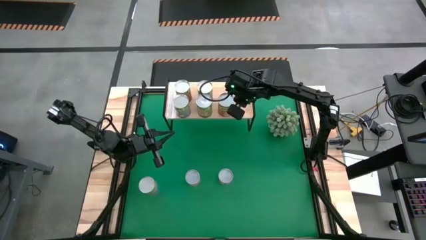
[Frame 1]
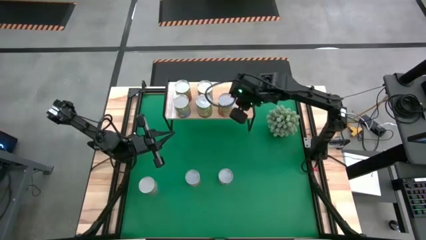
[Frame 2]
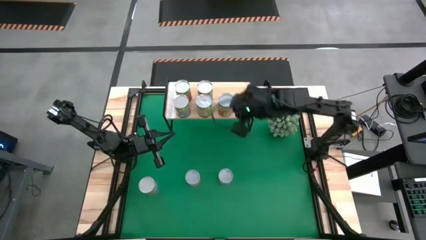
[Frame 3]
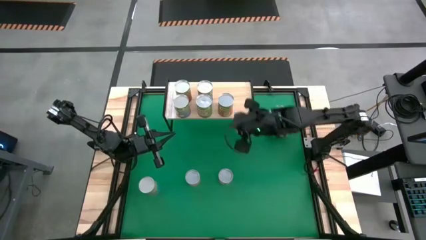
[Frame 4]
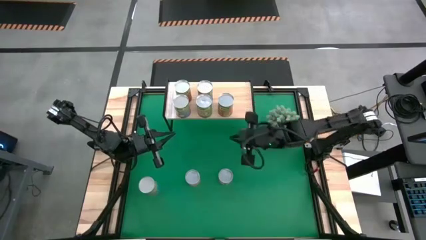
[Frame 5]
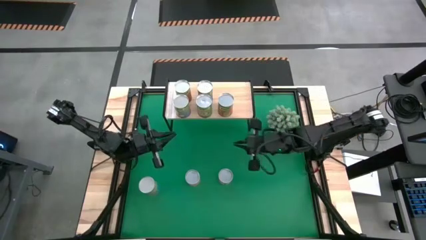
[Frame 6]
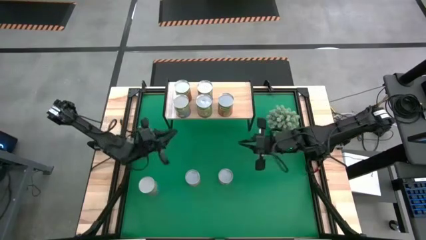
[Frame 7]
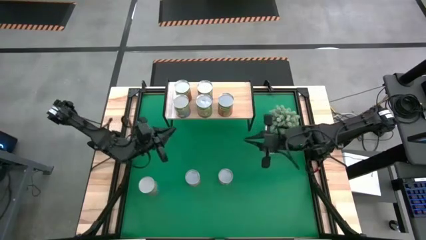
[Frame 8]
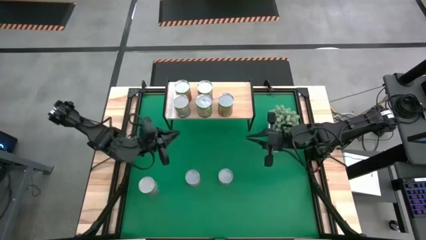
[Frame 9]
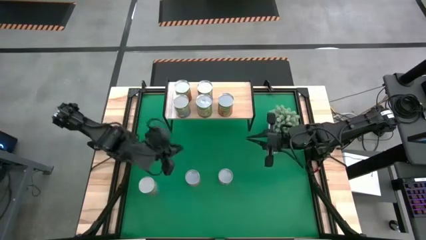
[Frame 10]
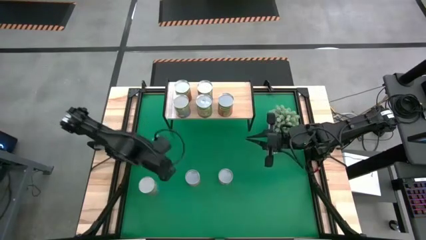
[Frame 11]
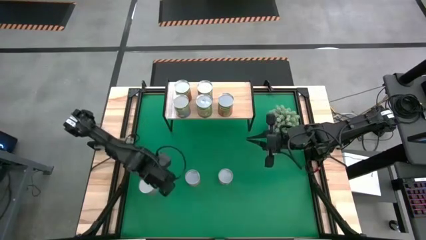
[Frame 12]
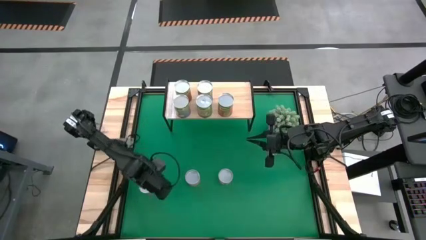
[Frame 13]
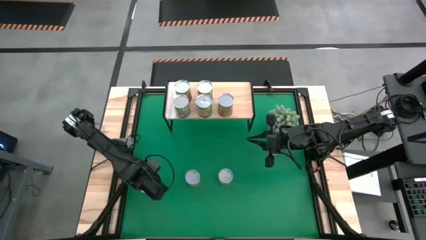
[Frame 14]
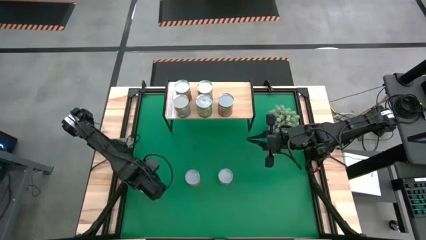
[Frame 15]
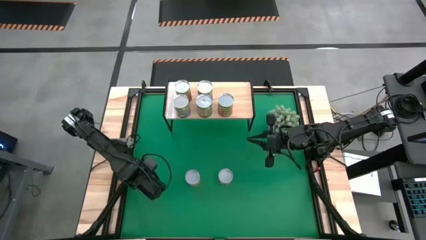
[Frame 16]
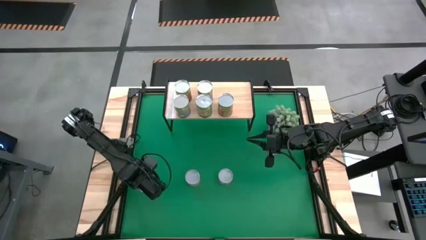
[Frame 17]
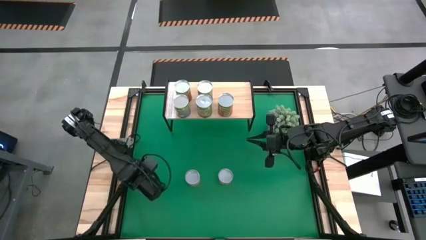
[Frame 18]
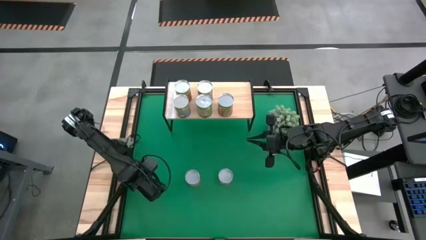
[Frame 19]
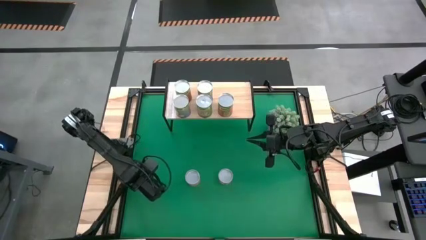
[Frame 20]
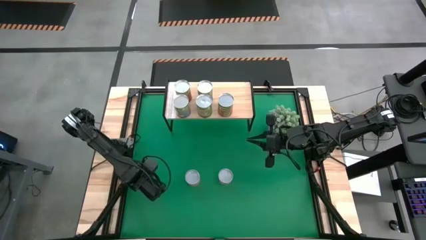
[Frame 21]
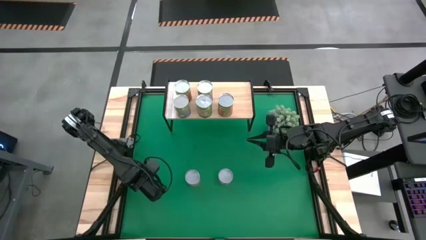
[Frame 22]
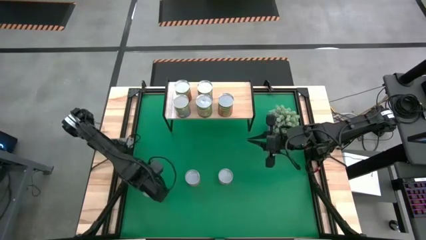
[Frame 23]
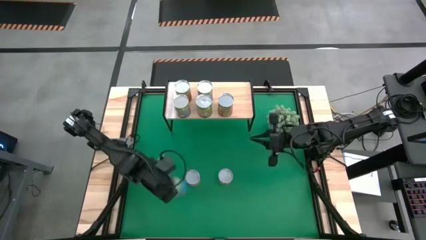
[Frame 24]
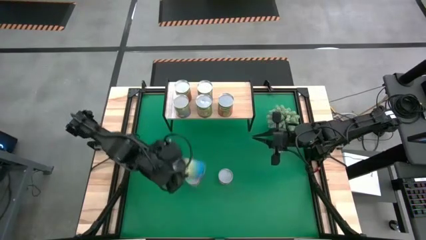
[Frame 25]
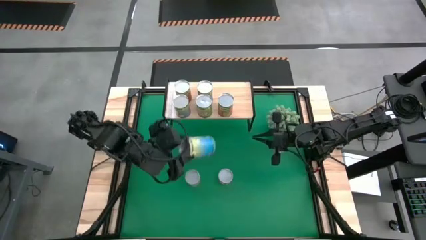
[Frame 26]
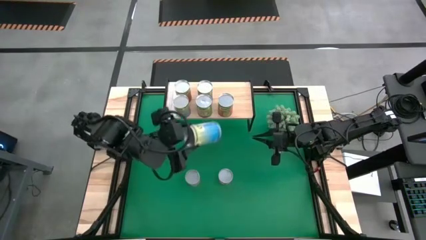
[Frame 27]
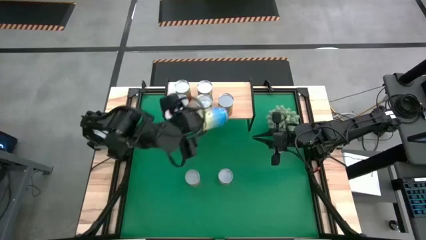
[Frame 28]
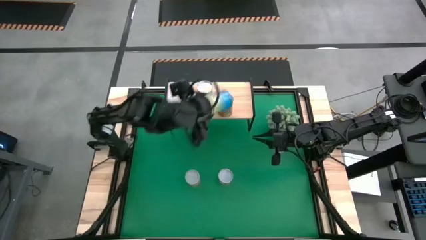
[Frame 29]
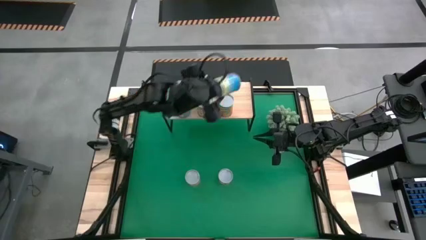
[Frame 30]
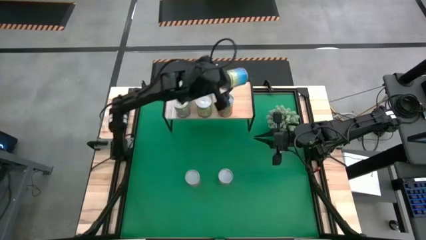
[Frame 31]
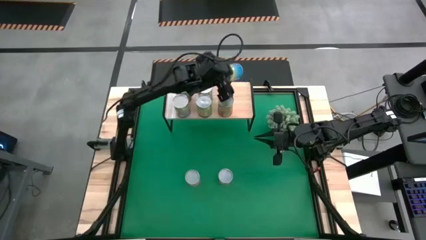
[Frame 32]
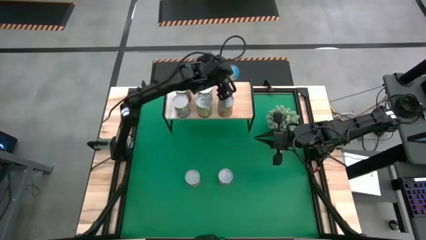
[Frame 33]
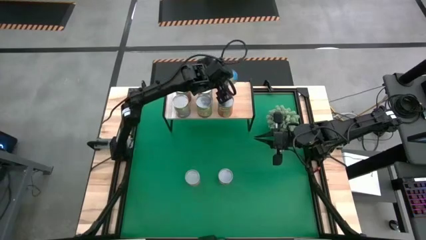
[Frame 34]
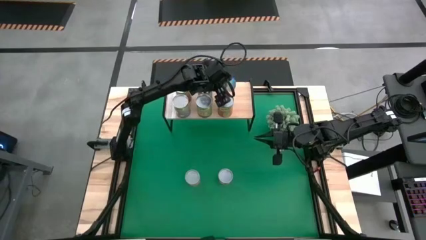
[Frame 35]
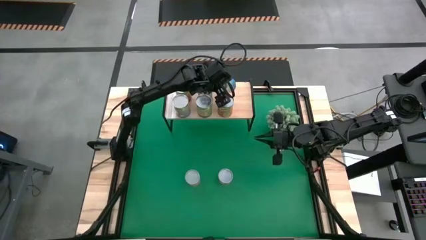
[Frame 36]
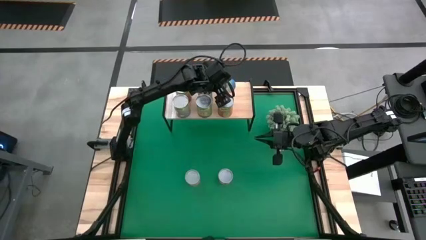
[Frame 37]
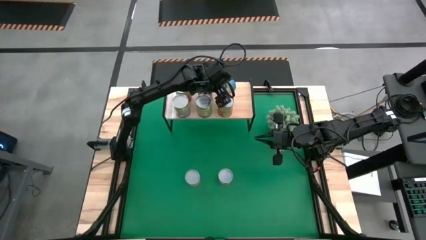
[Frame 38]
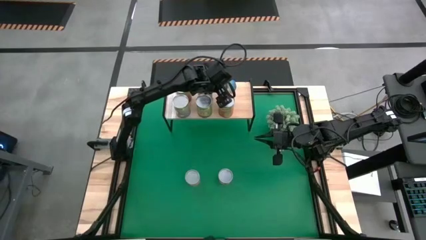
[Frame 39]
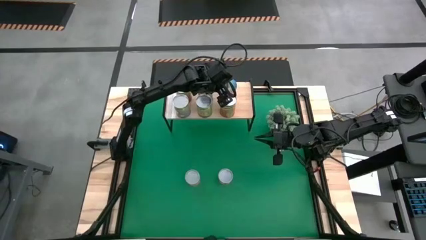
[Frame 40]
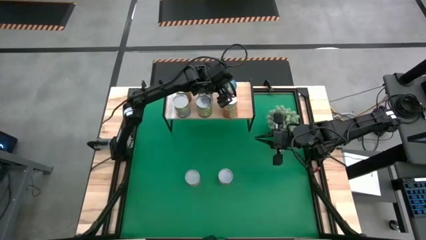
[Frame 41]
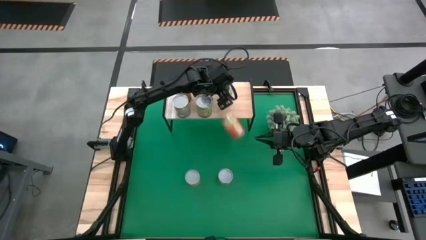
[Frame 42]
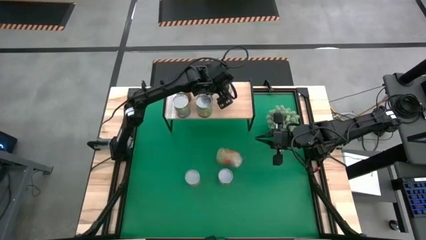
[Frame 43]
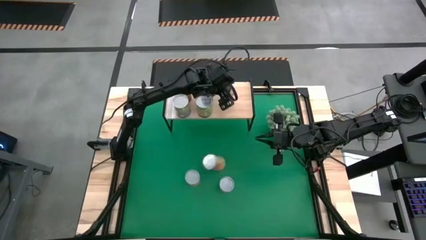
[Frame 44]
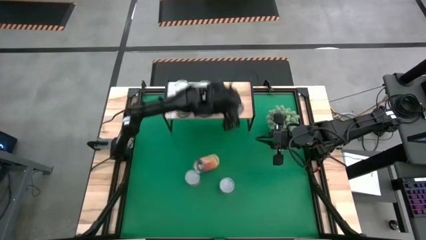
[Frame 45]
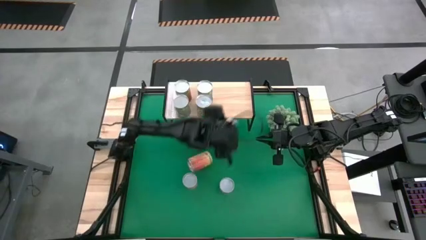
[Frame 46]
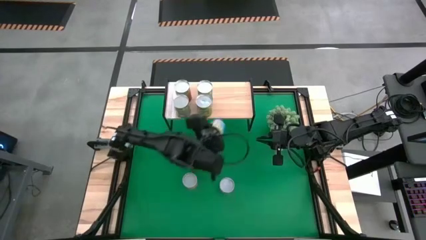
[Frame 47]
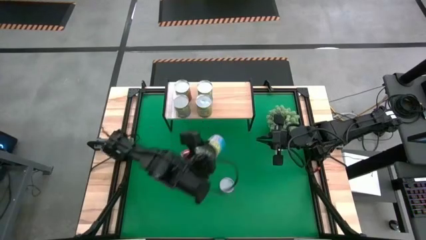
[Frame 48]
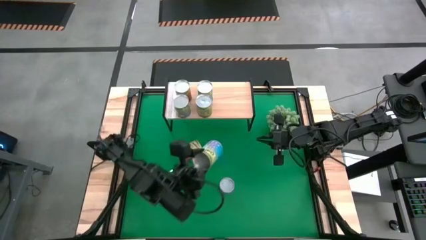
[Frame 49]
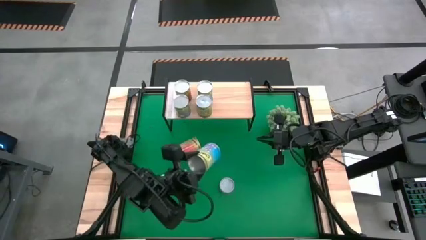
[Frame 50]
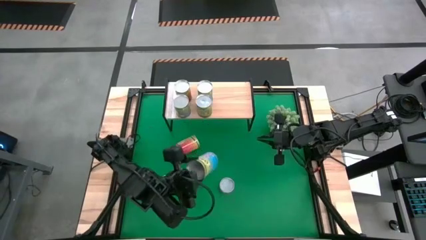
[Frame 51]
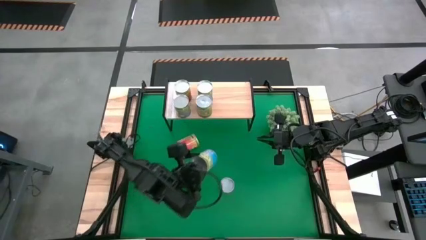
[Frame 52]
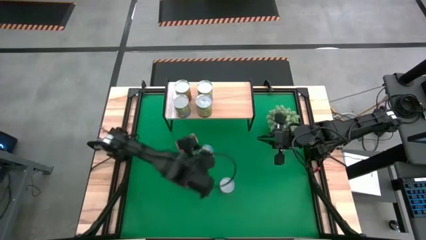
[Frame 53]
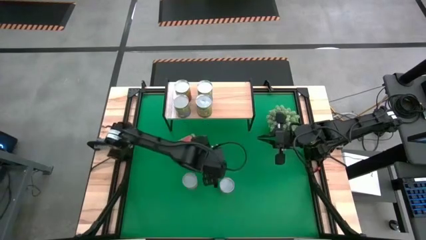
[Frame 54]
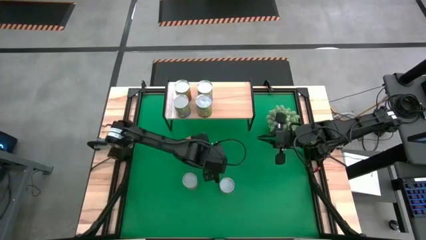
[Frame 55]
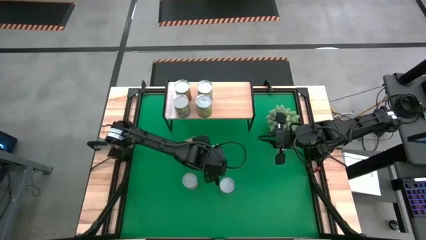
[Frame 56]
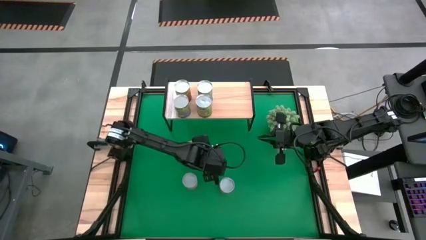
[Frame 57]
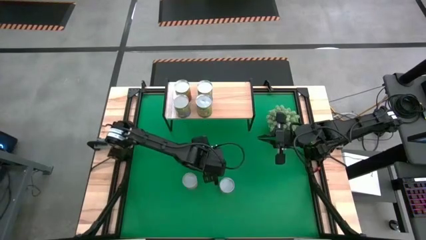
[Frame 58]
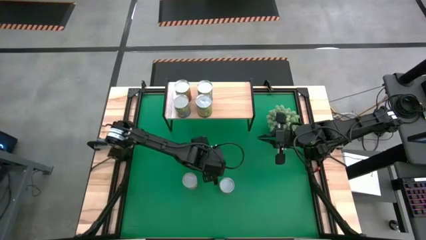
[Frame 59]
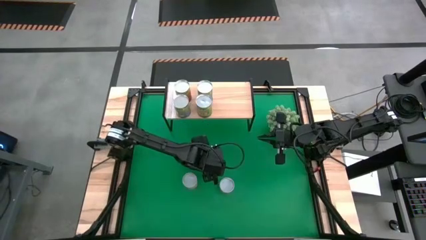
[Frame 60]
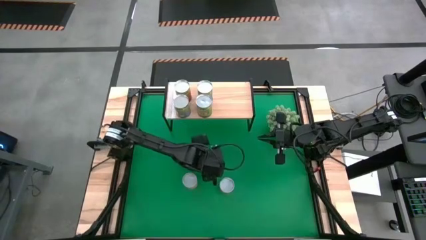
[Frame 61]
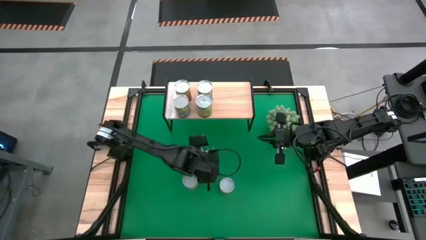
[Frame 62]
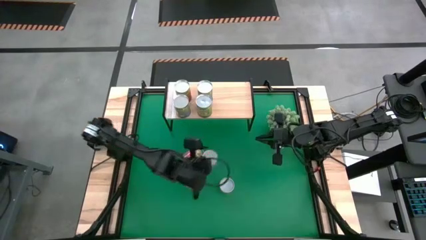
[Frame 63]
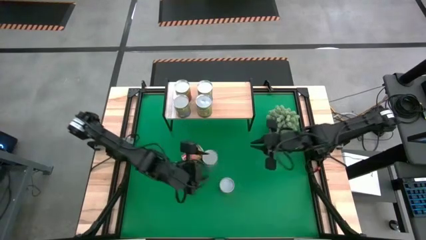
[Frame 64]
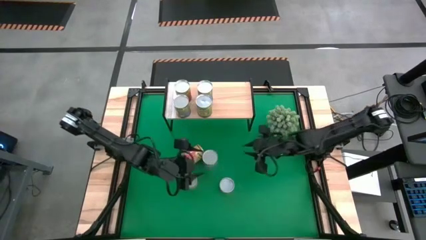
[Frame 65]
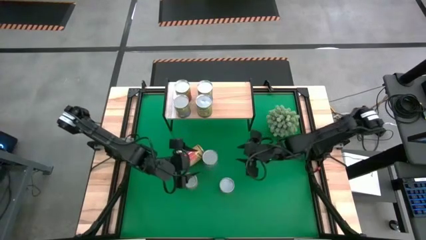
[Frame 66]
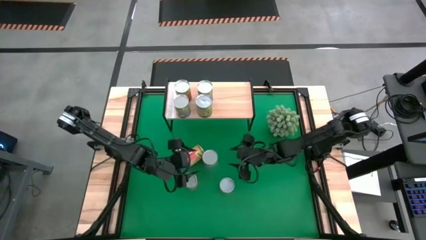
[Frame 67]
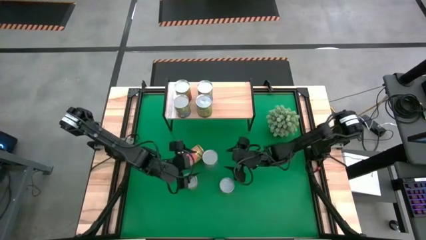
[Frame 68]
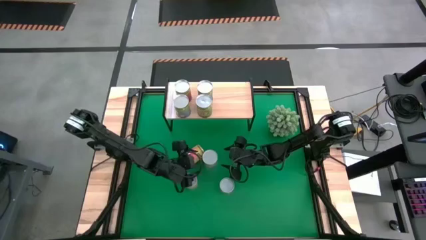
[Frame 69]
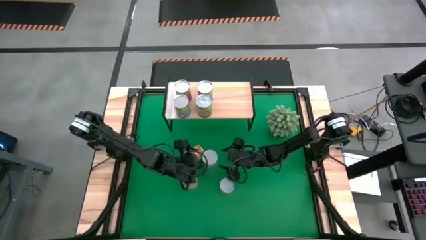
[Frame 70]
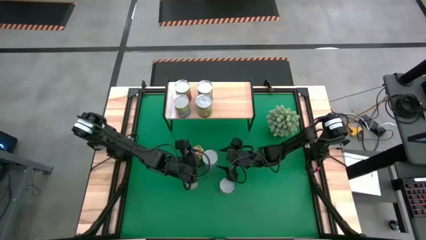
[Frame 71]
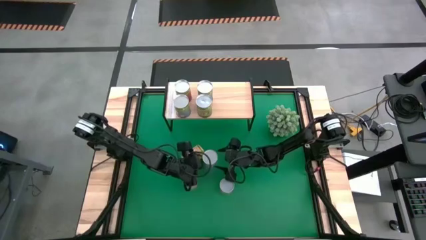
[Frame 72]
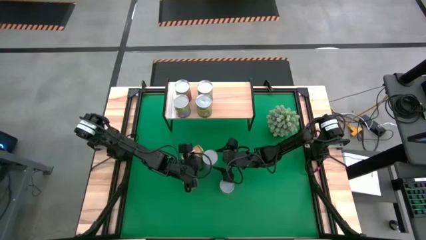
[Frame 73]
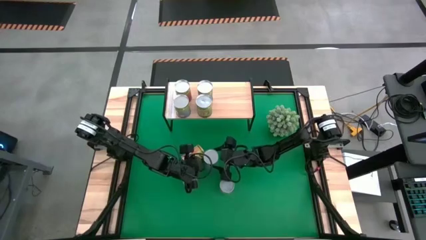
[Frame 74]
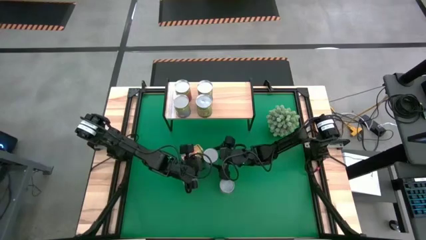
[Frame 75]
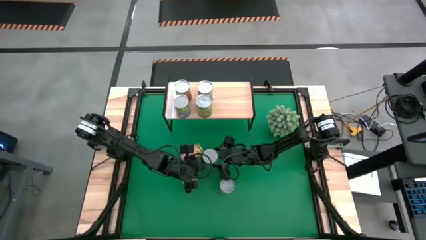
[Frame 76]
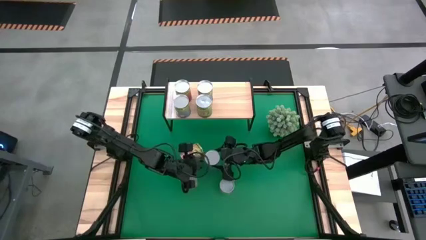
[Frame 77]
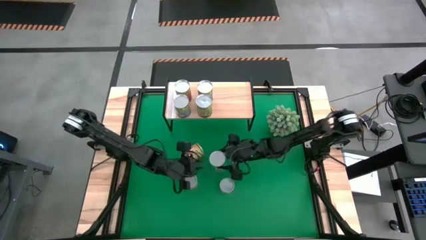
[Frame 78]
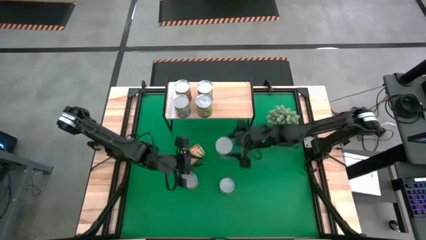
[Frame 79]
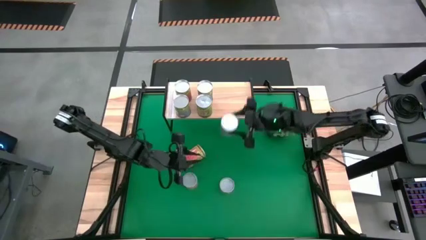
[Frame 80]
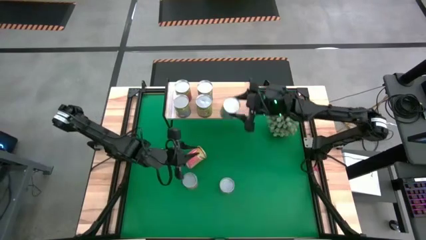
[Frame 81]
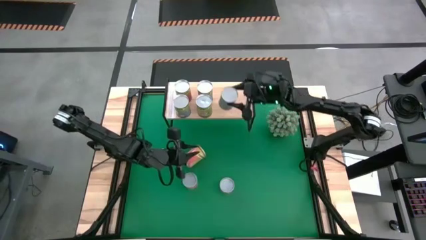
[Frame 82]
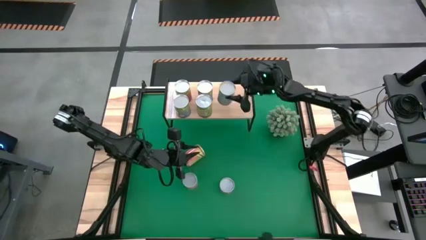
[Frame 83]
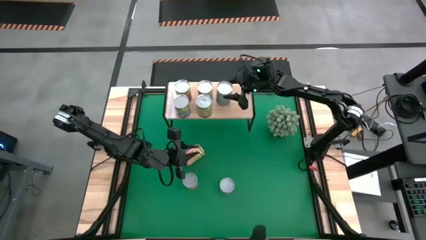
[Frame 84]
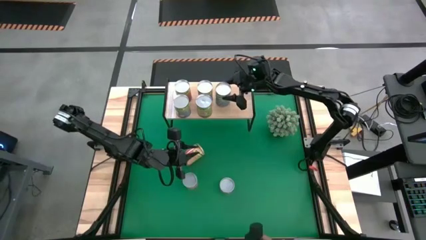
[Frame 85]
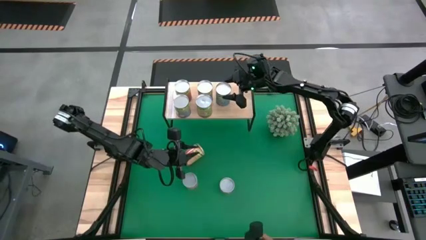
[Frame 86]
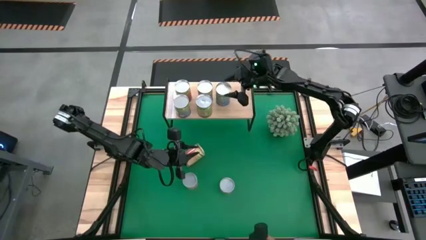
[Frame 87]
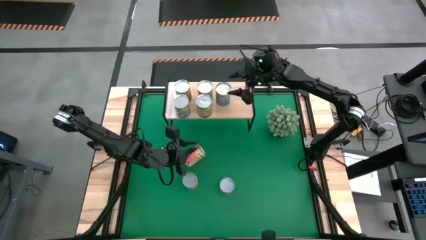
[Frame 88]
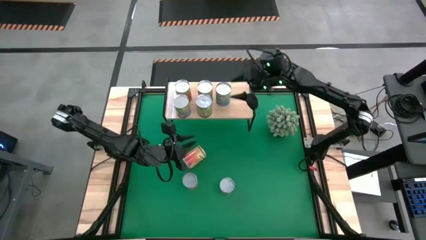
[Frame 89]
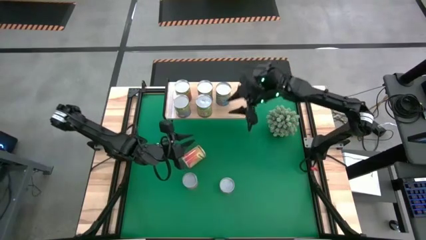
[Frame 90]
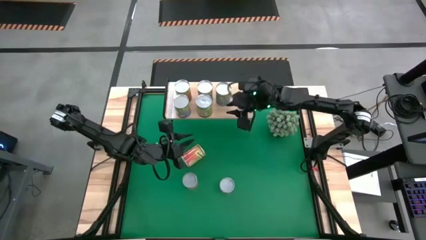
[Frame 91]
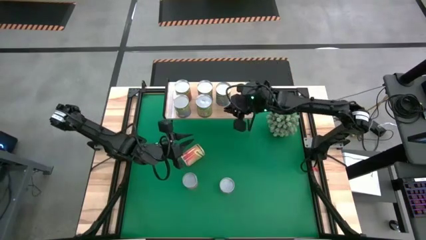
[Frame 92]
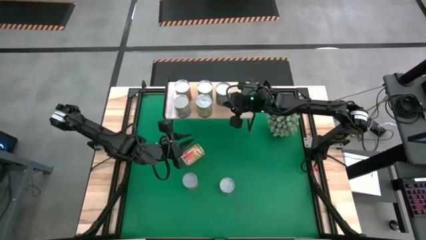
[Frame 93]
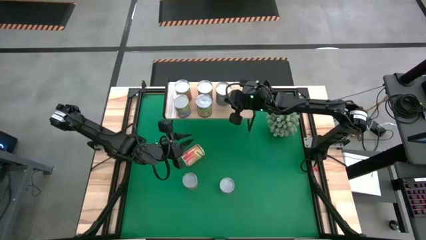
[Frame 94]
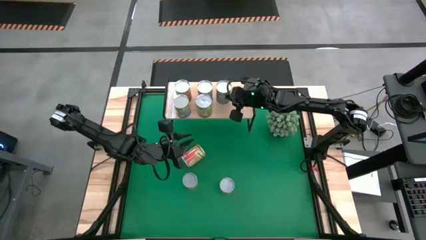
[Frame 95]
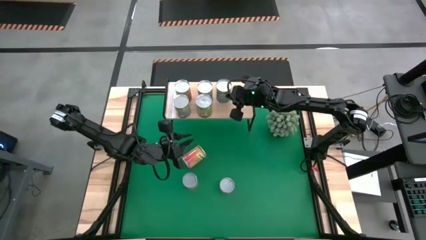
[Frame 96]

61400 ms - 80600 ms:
Task: Pick and place cans onto a shelf
Put the canned cherries on the shelf
